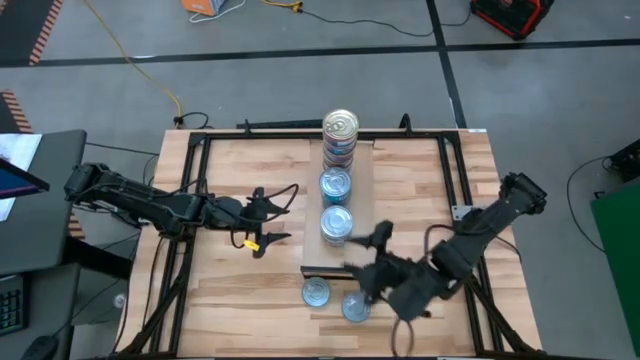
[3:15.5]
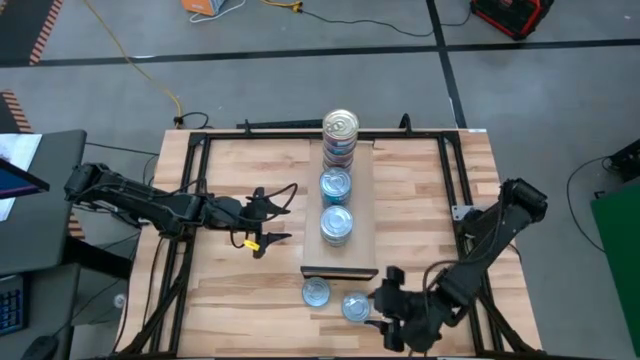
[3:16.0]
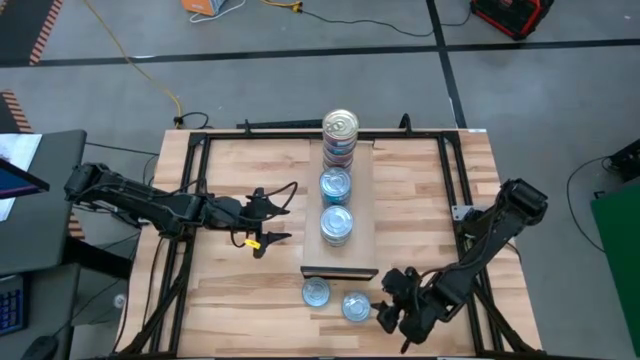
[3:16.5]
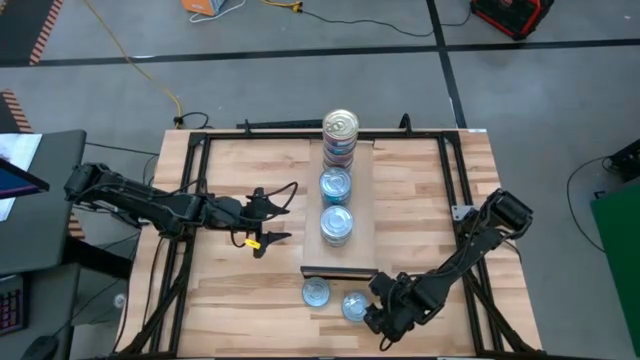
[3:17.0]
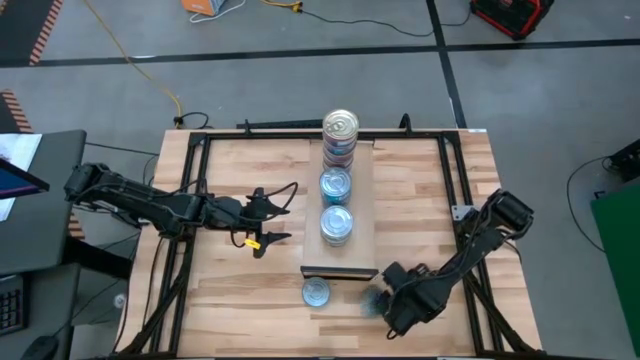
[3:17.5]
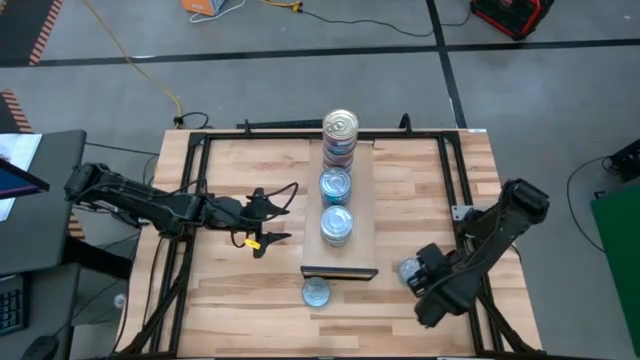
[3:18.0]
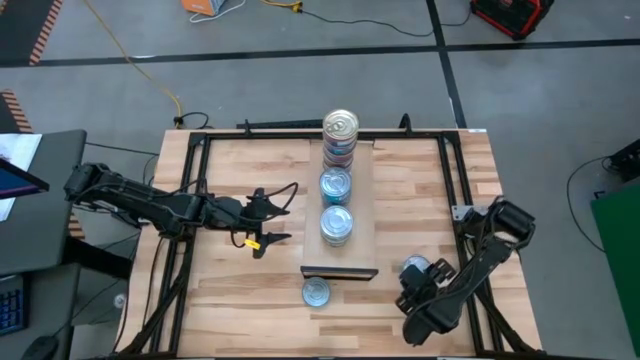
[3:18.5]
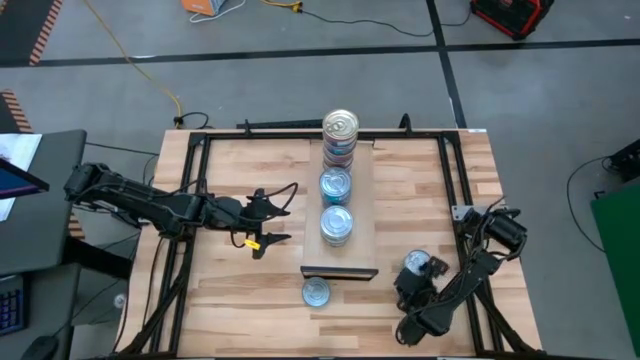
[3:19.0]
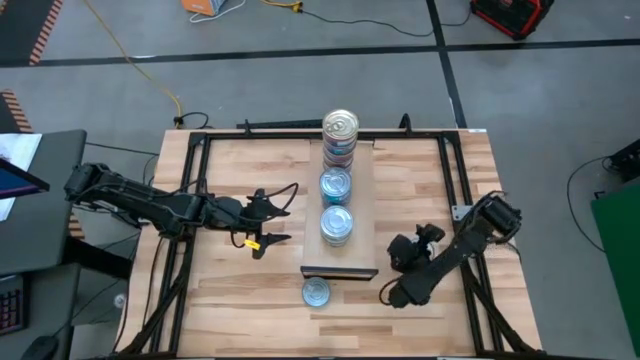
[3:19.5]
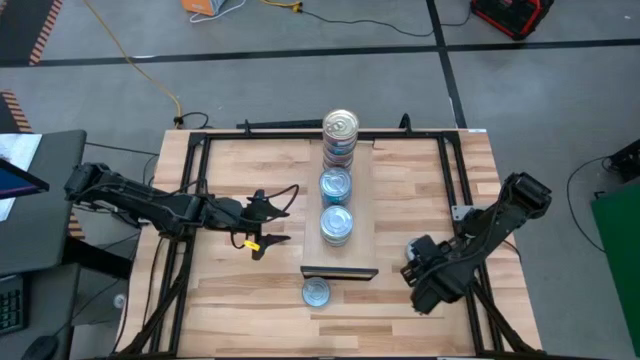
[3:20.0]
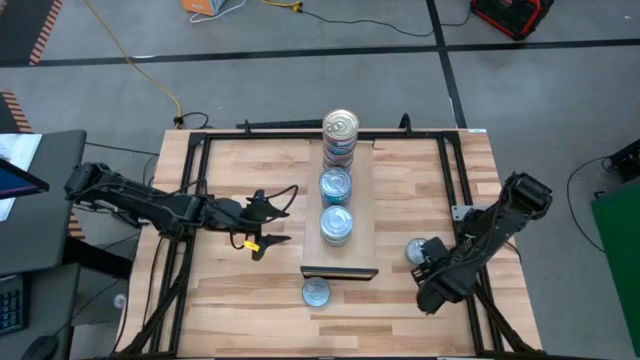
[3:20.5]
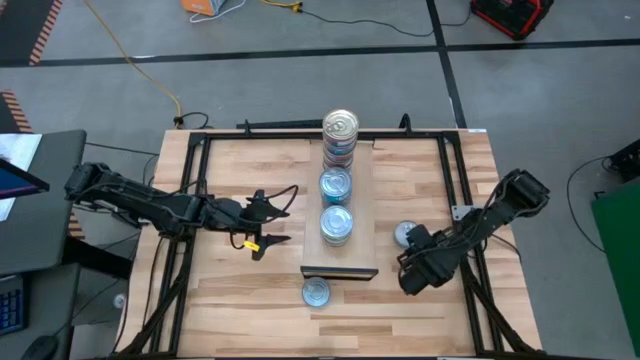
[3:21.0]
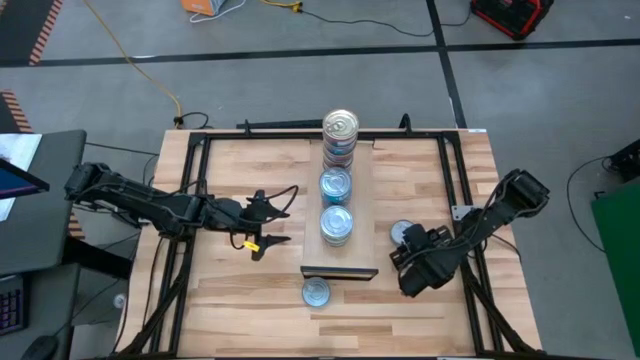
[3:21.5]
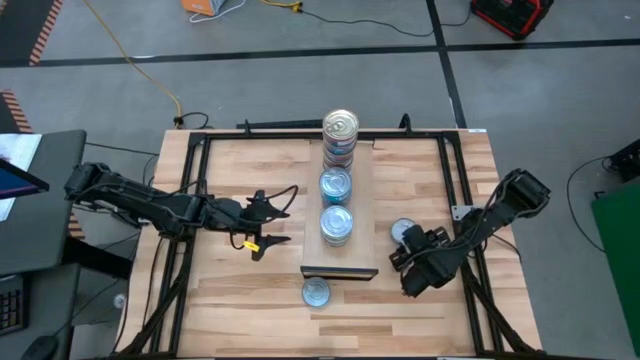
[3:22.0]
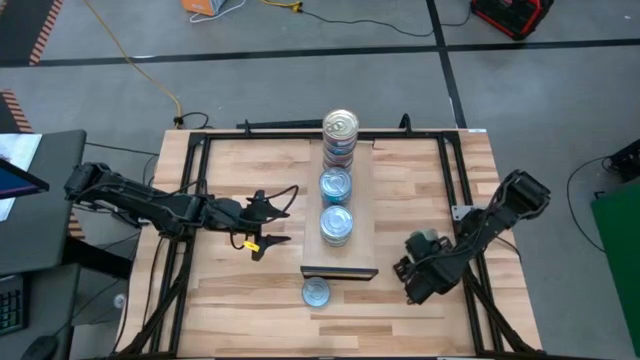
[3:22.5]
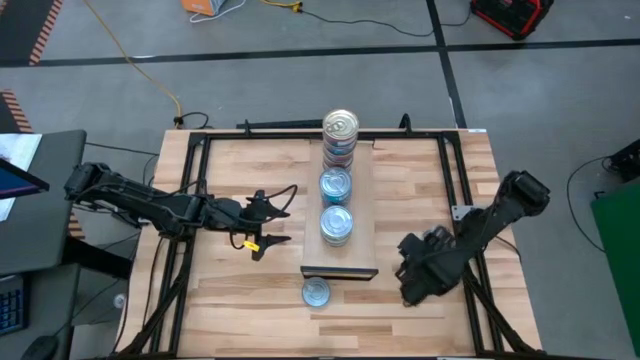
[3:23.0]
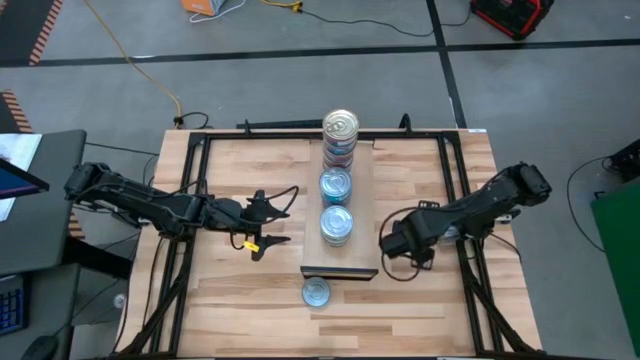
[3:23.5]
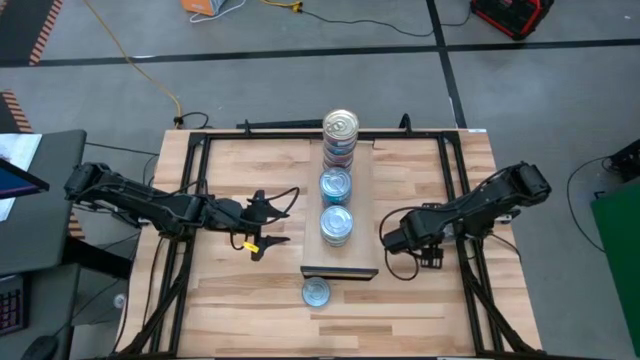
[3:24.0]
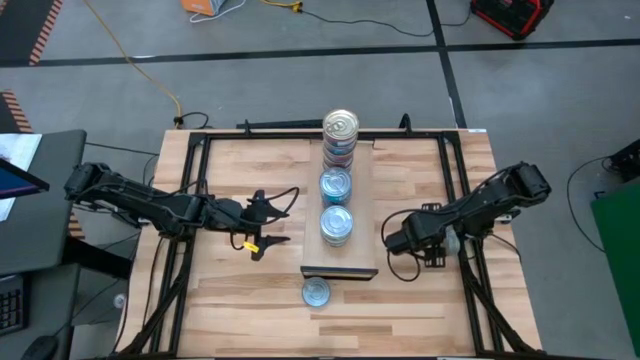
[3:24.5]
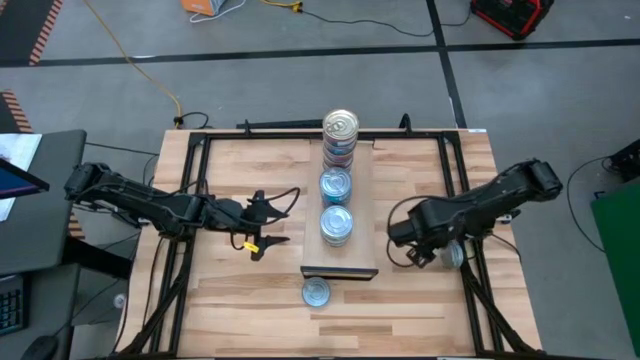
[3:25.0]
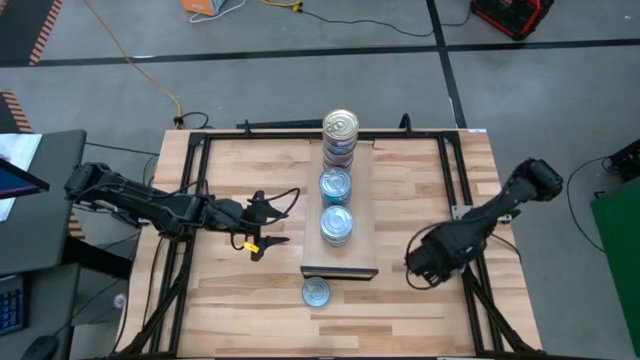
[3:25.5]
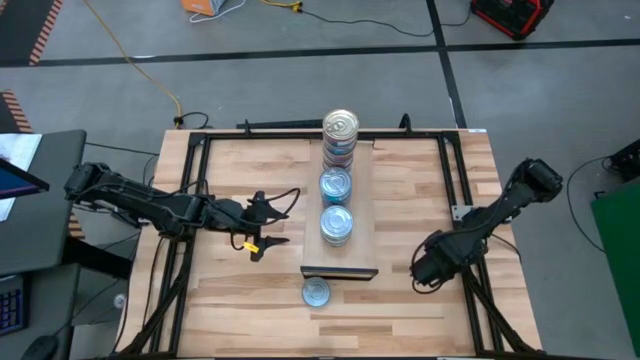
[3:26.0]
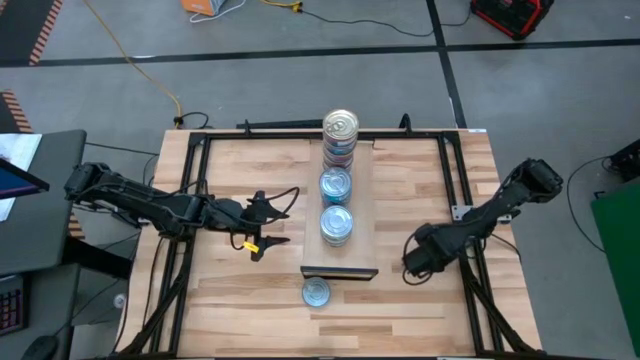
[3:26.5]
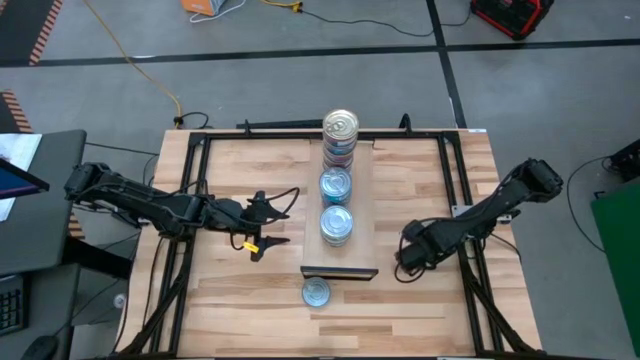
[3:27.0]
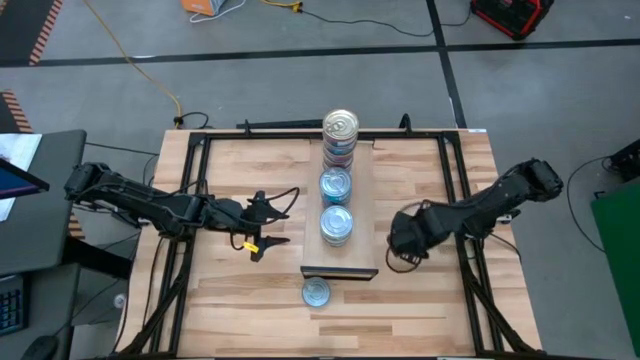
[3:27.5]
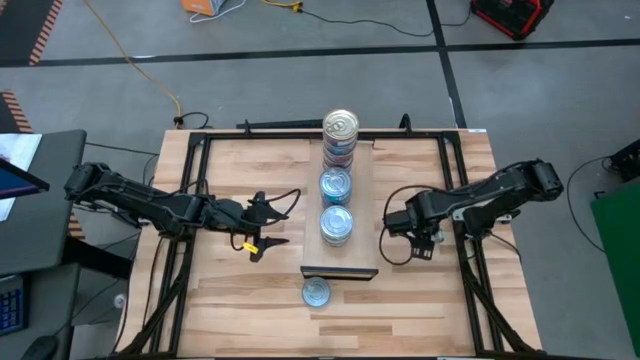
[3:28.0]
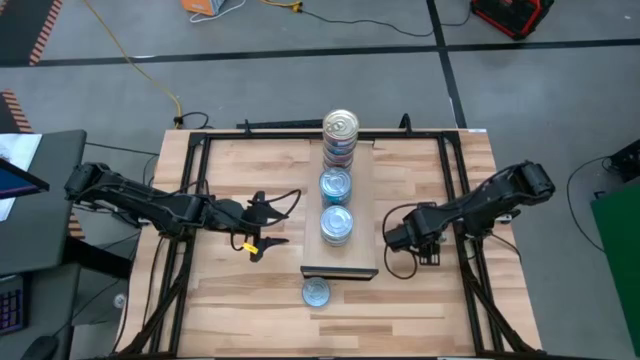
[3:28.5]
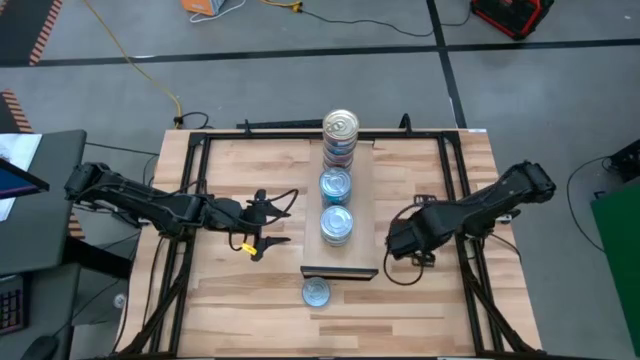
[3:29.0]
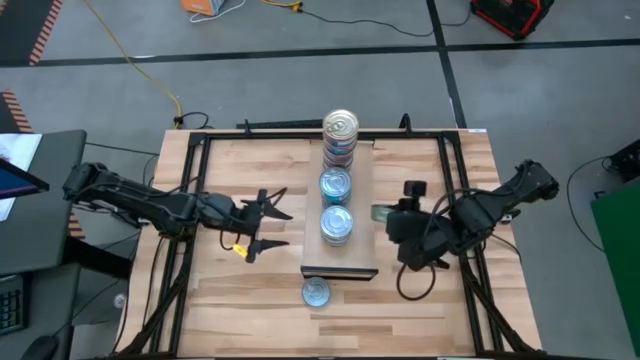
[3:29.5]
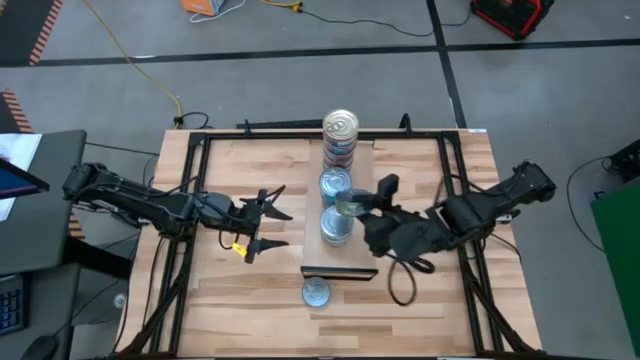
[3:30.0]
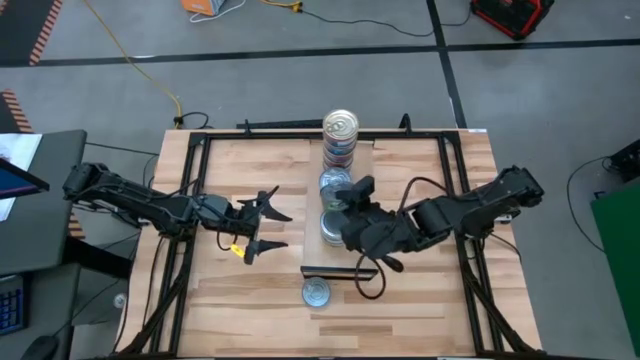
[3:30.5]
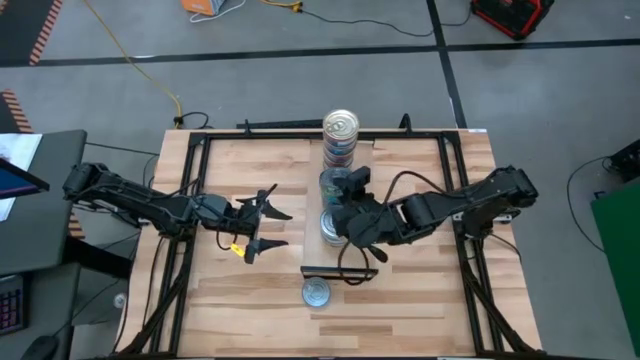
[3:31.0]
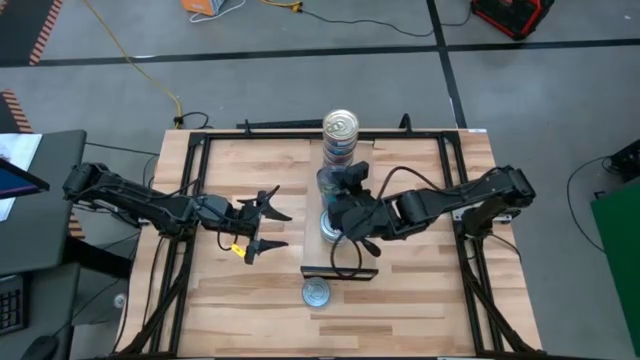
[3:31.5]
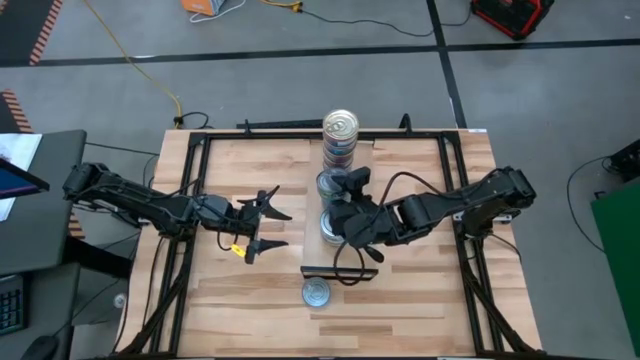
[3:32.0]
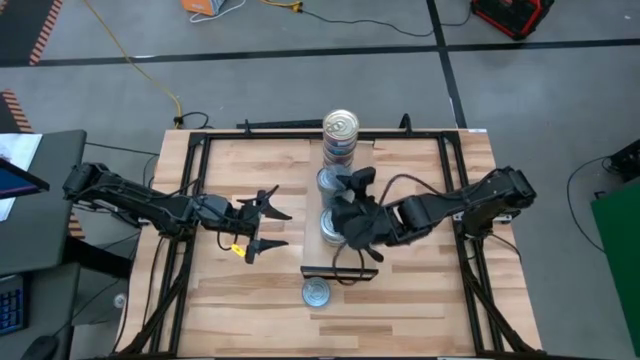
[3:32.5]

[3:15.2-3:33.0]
Task: Stack canned seafood by type on shelf
Stack the green tuna can on the shelf on top of the yellow and blue tuna can

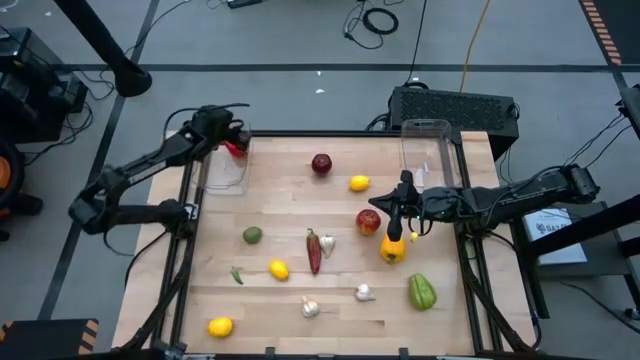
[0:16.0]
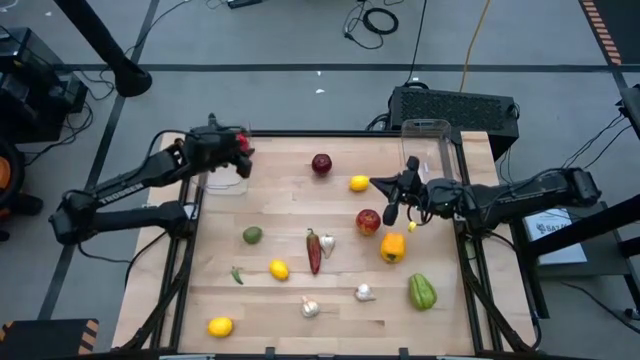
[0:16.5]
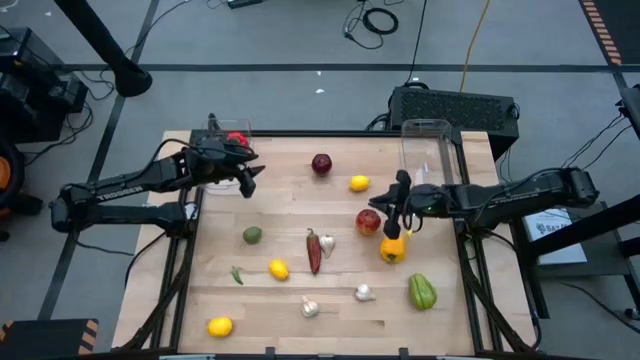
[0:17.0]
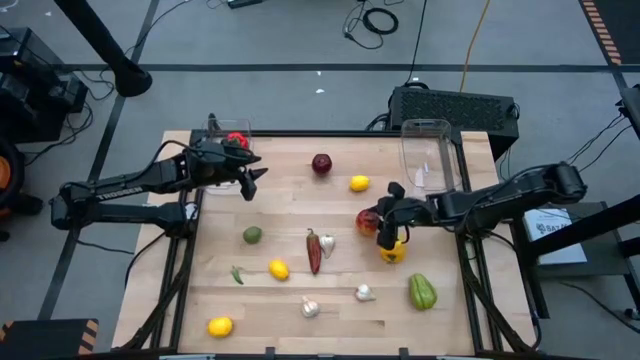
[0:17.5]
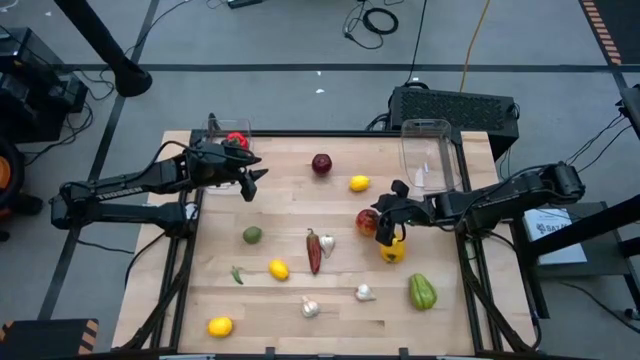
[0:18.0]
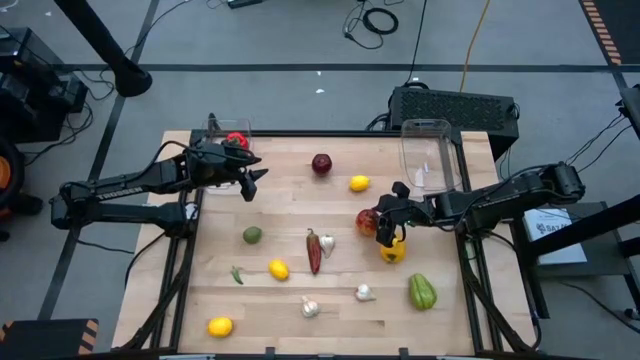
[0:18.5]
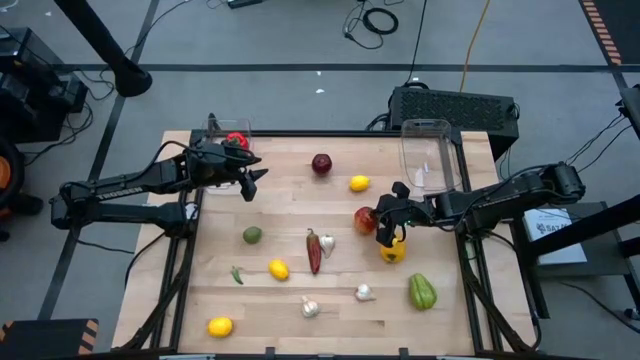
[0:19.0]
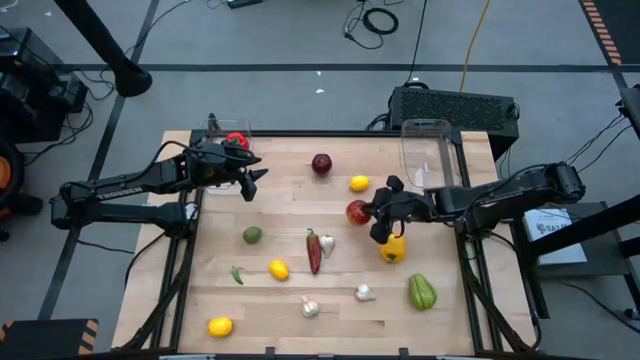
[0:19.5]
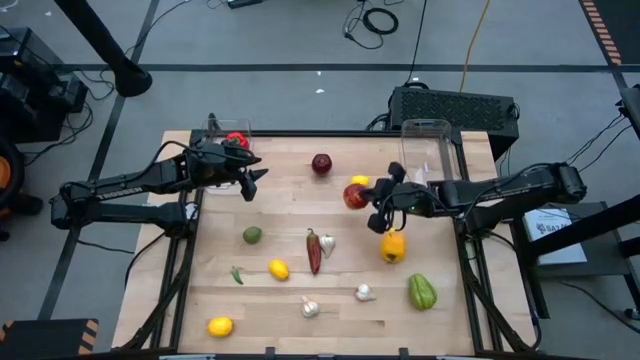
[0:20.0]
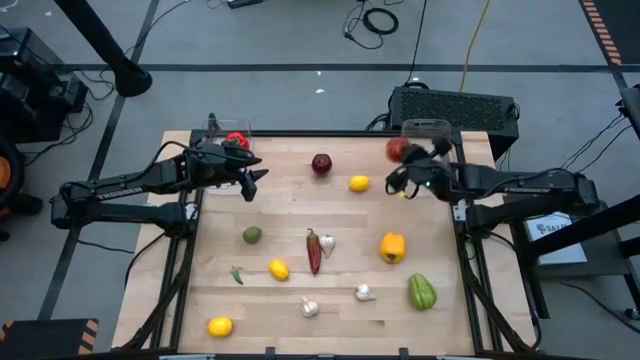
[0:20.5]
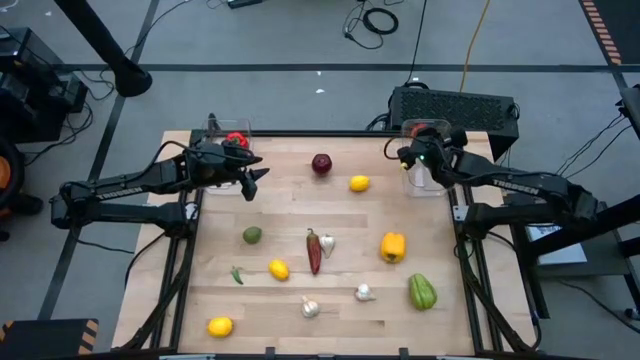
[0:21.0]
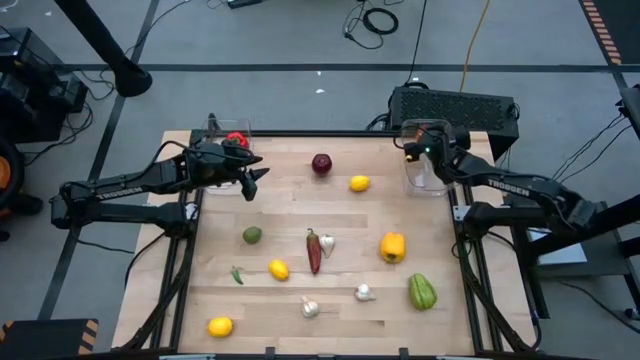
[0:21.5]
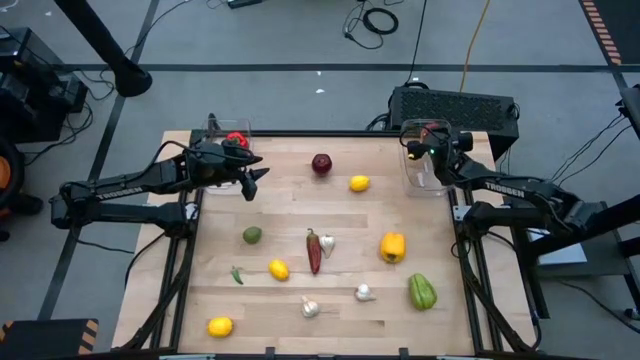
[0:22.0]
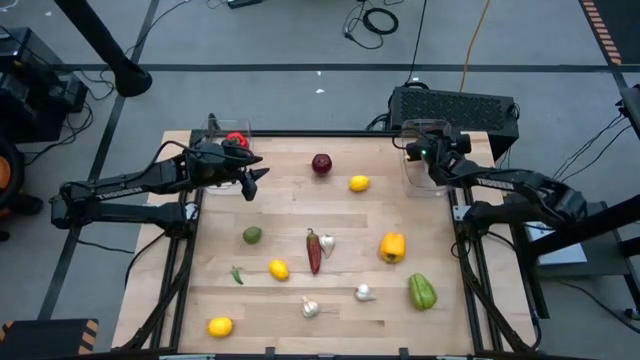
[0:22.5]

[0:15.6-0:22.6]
Task: Sort produce into baskets
Put the bottom apple into the right transparent bin
